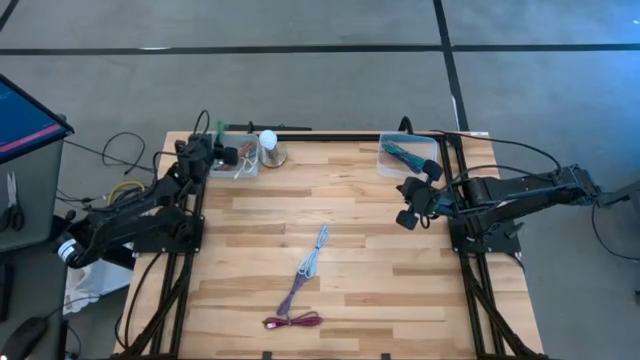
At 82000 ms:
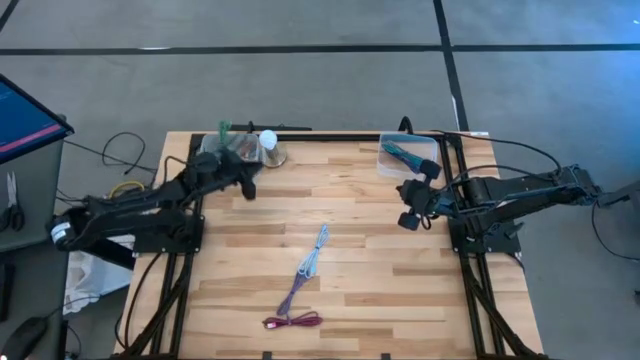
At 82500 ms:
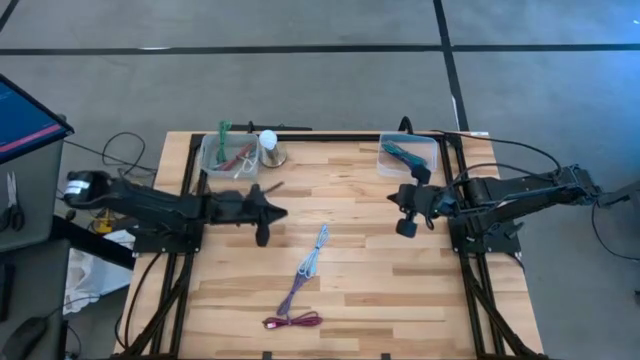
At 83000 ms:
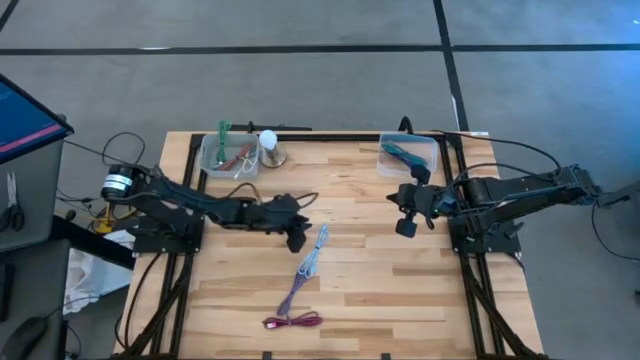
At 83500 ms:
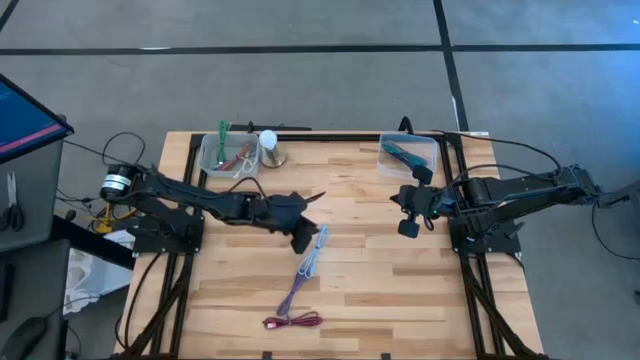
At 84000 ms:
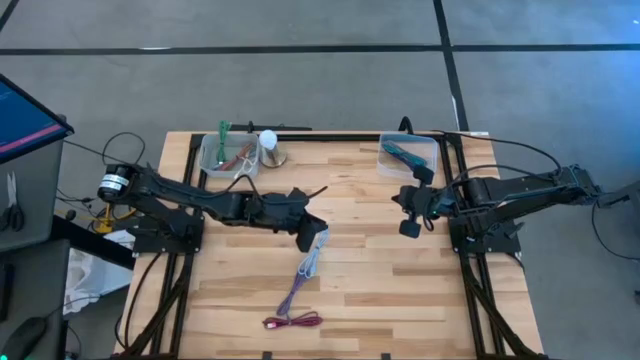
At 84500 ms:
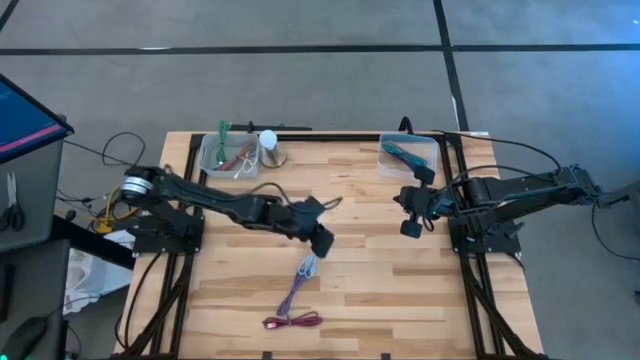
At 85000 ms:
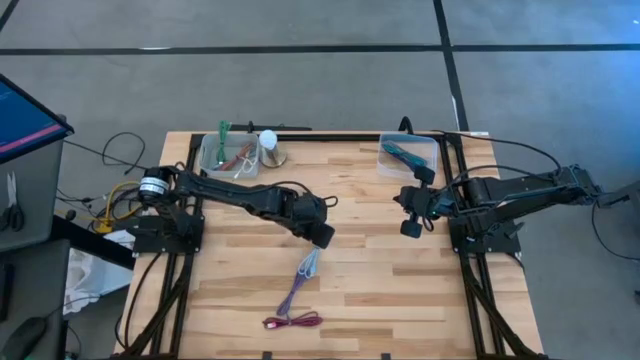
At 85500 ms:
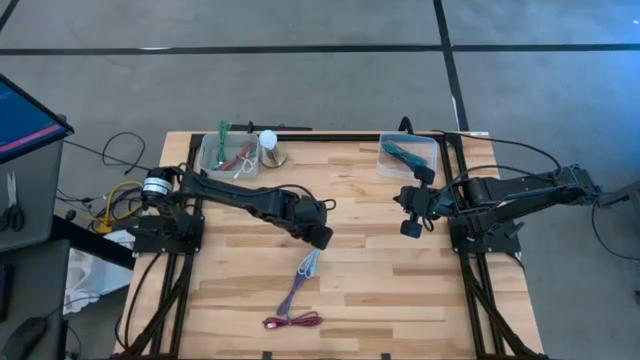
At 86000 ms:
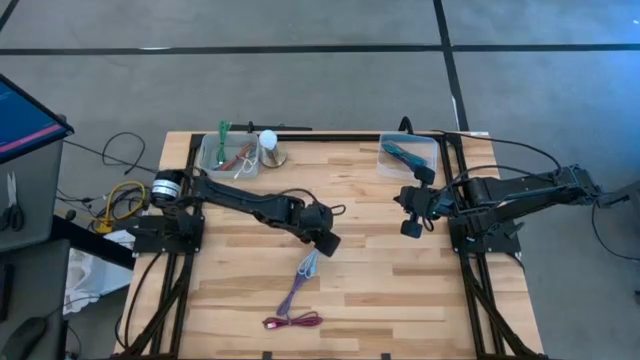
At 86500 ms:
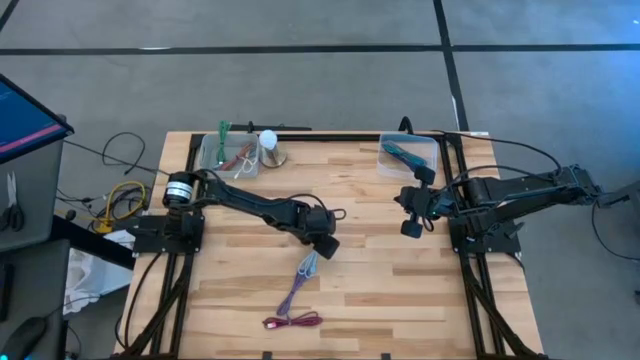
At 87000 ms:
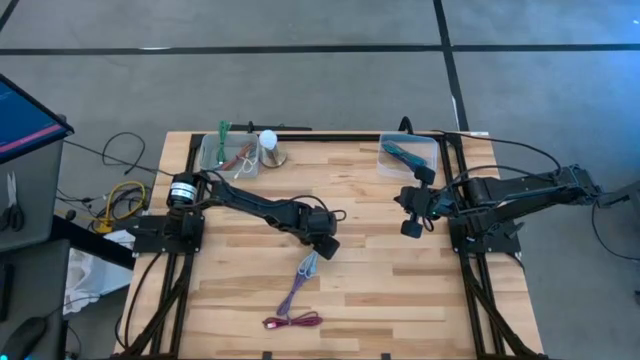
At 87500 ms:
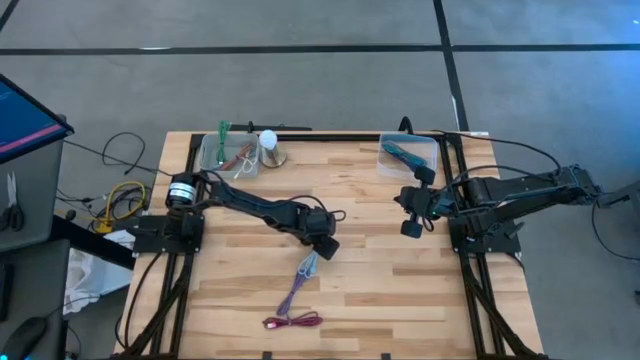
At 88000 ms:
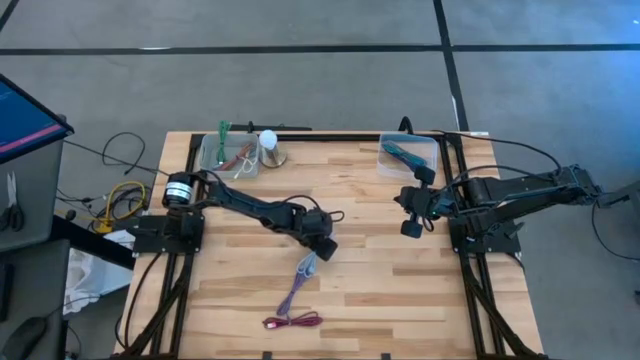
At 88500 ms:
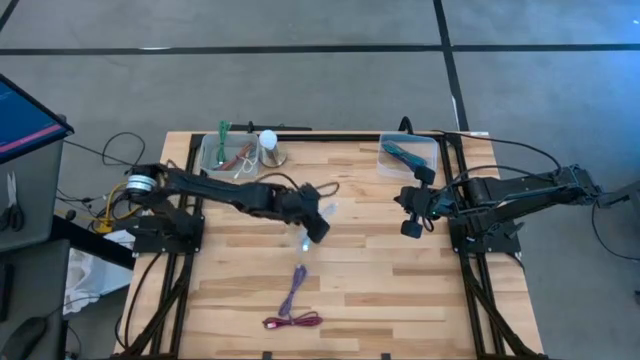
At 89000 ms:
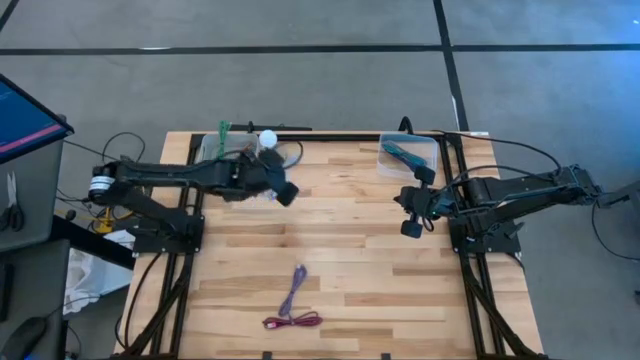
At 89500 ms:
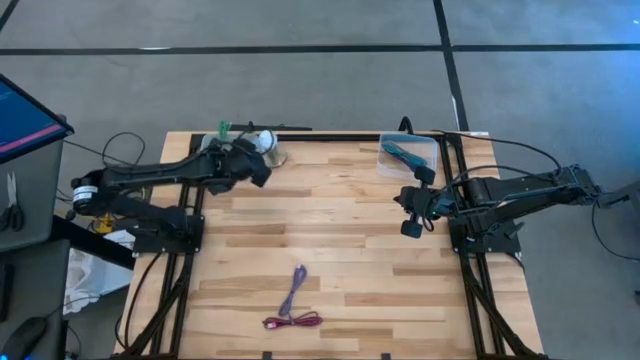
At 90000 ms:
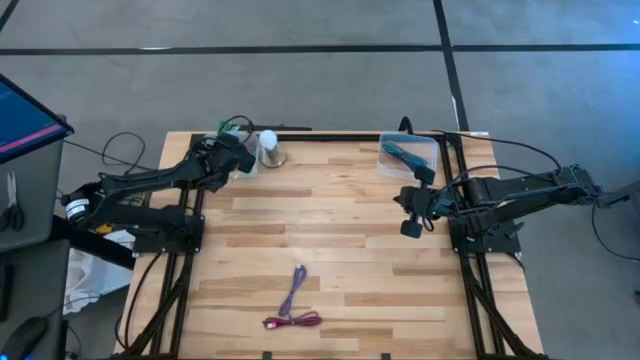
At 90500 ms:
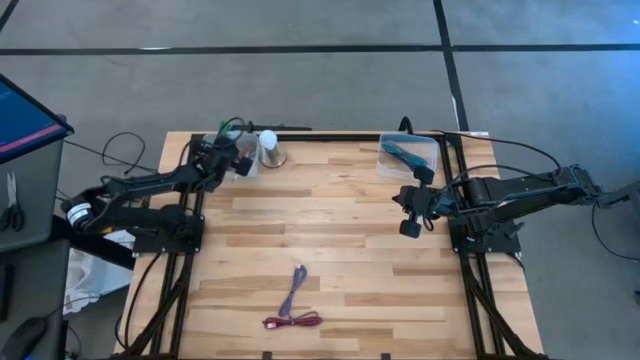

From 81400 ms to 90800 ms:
Task: Pick & Place USB Port
Put the light blue charger cable into the gray bin

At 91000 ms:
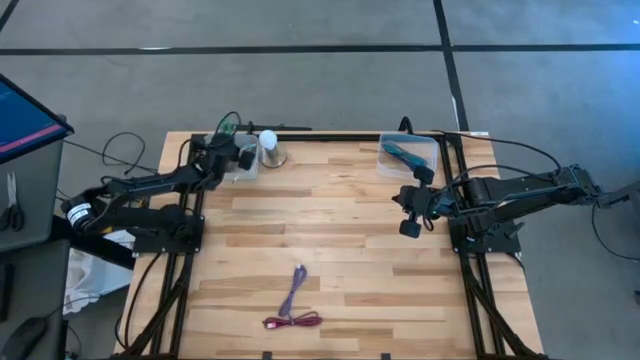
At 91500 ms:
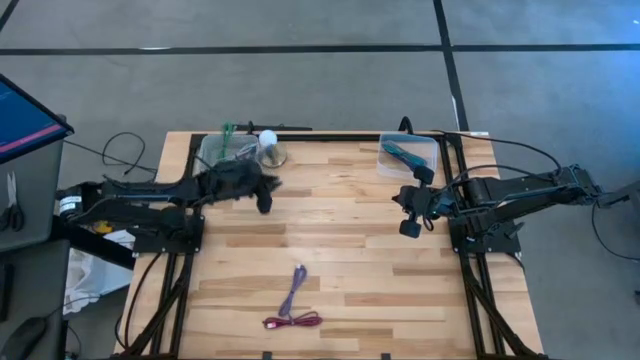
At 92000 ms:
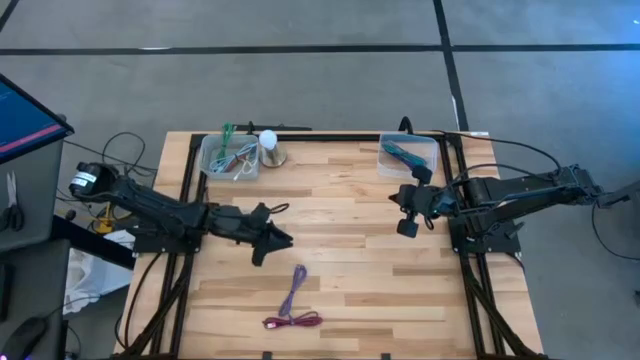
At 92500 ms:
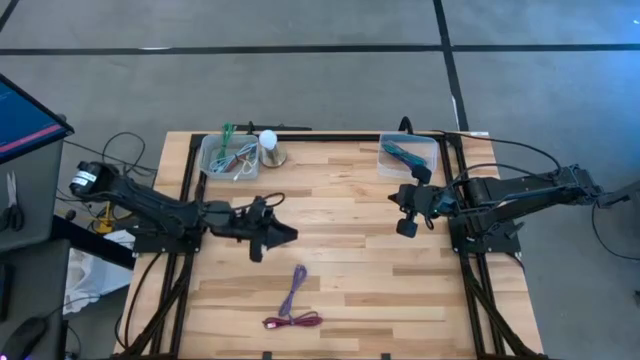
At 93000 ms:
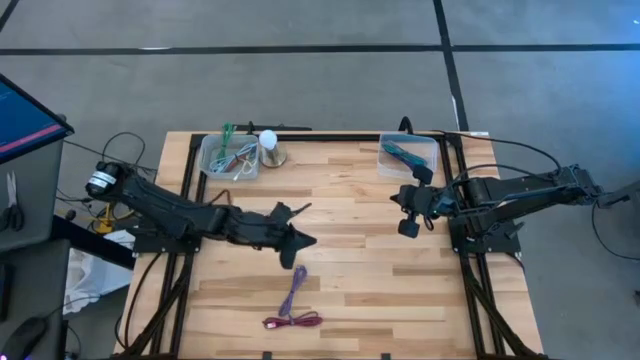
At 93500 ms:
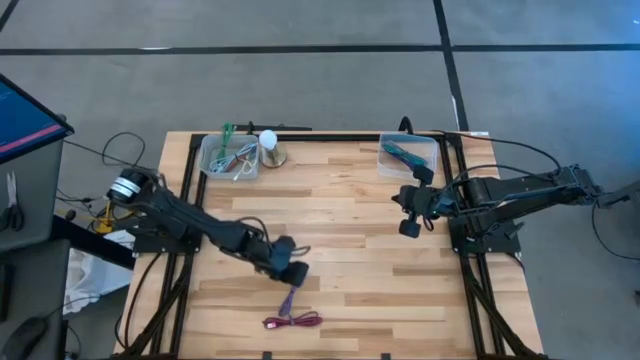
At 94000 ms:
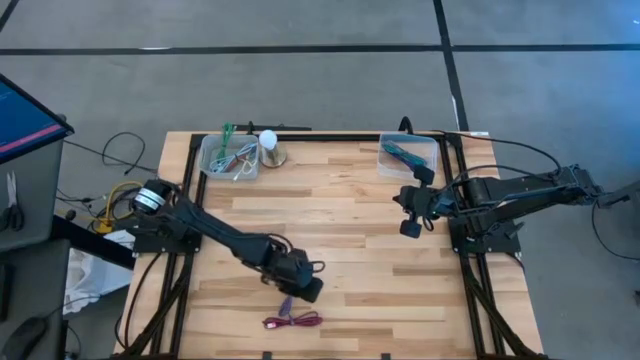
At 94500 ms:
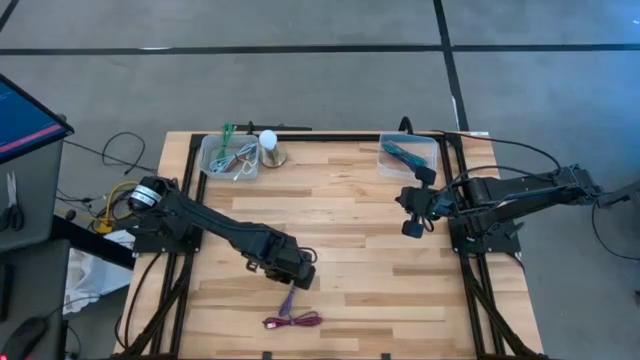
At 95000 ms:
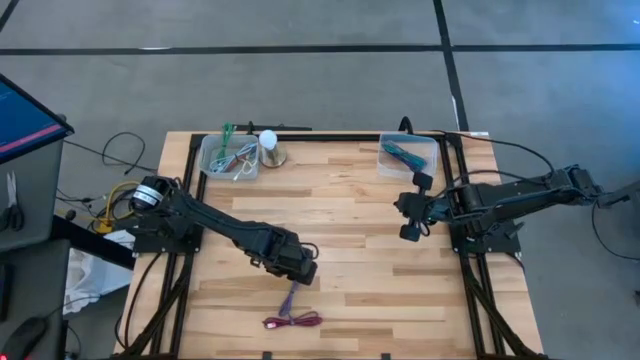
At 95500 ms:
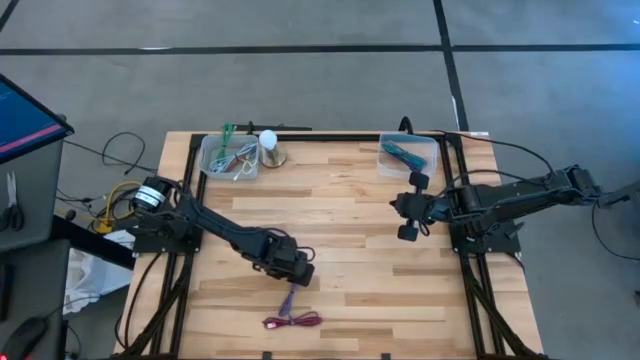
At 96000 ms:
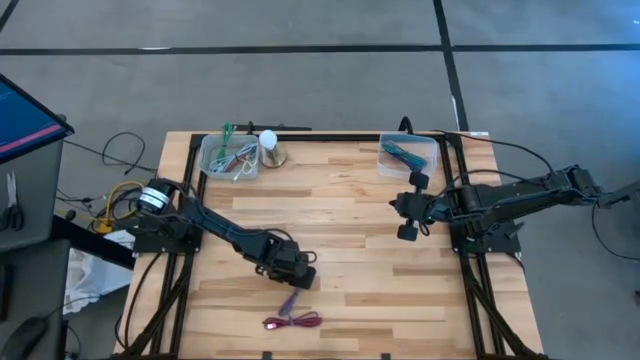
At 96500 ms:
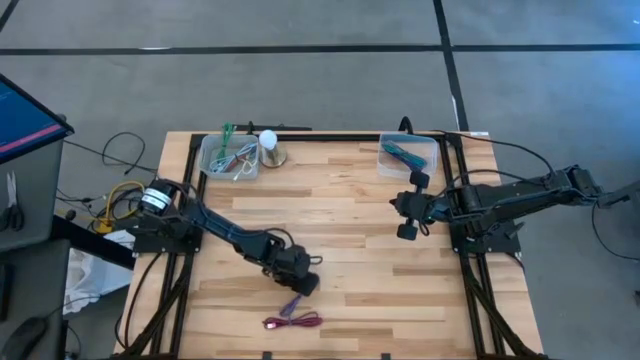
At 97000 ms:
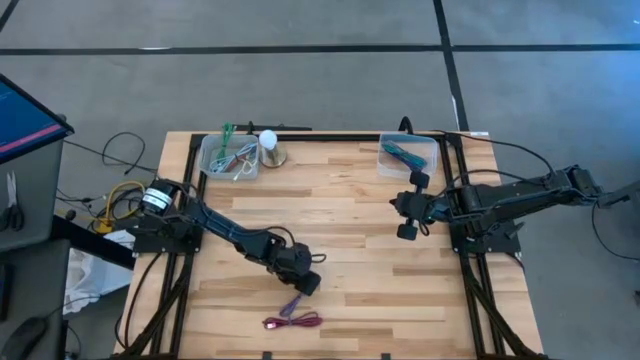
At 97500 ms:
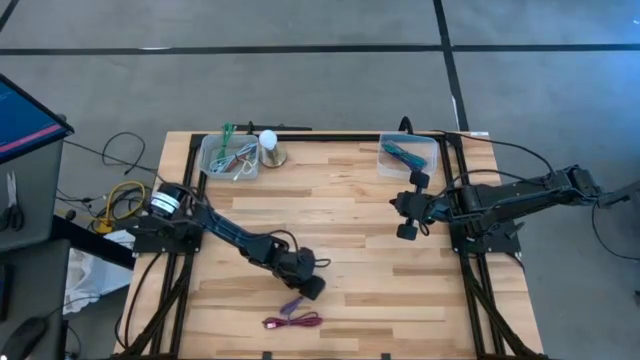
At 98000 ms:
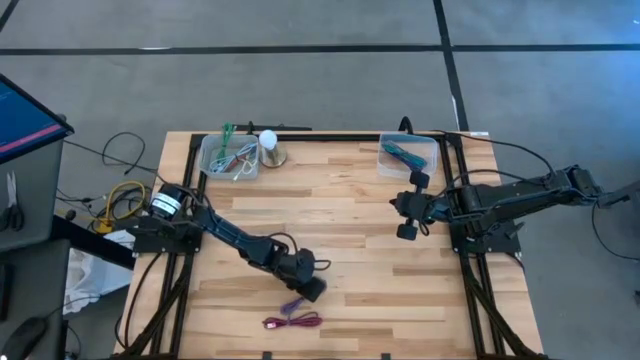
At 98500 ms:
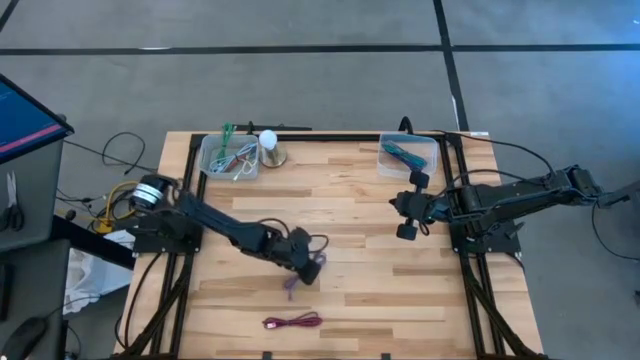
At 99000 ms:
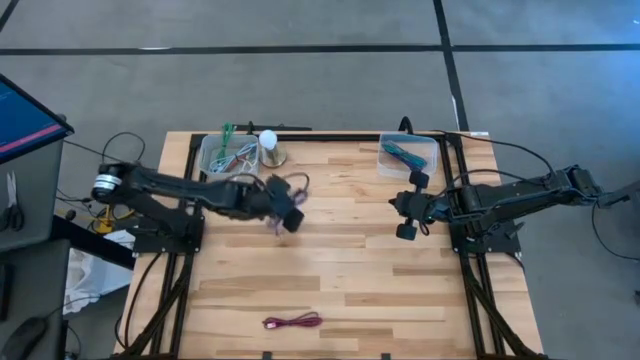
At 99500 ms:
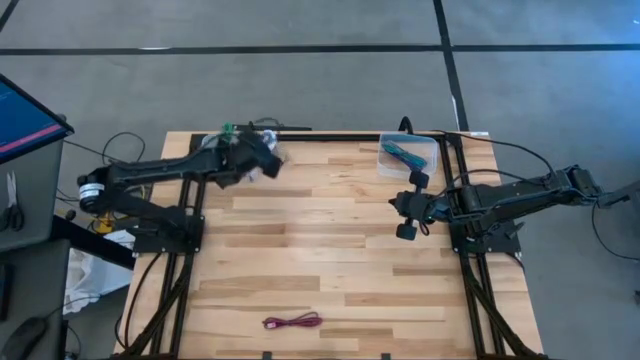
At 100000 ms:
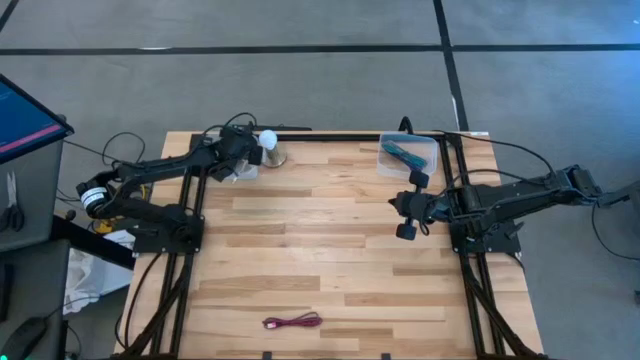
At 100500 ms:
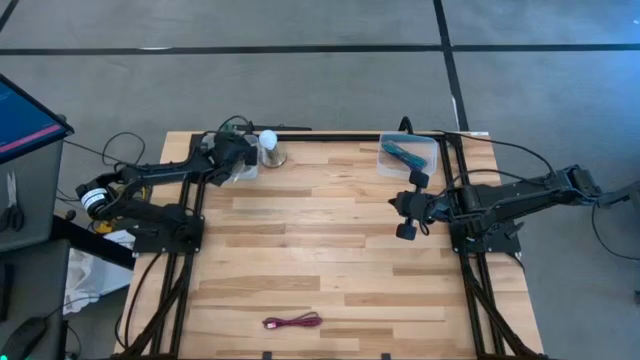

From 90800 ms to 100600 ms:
Put the purple charger cable into the gray bin

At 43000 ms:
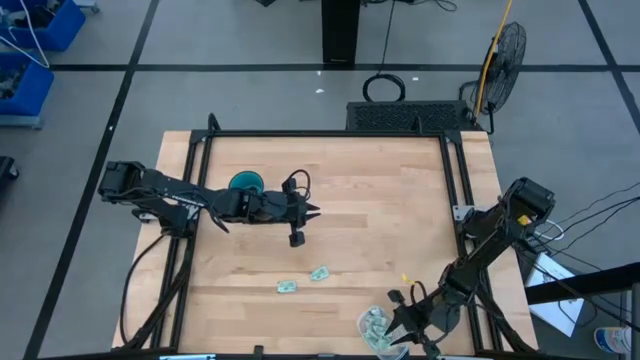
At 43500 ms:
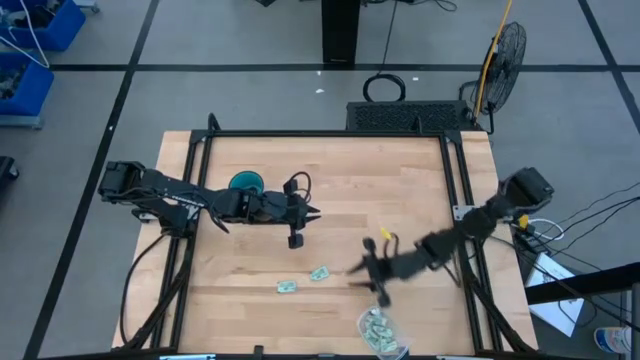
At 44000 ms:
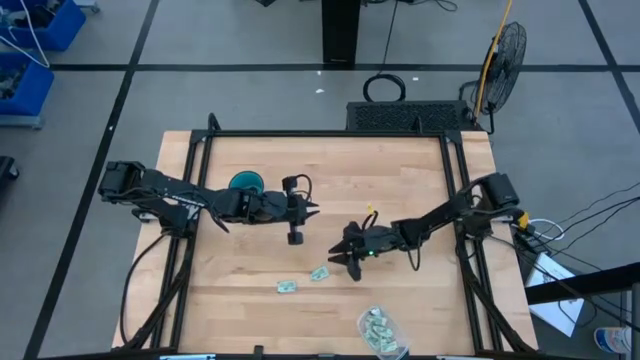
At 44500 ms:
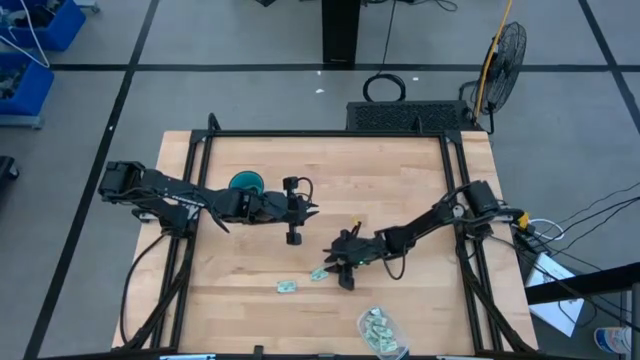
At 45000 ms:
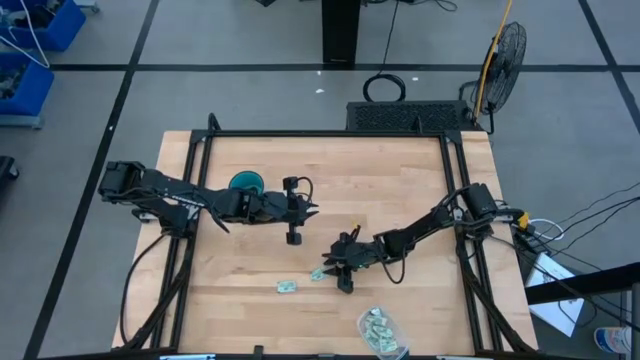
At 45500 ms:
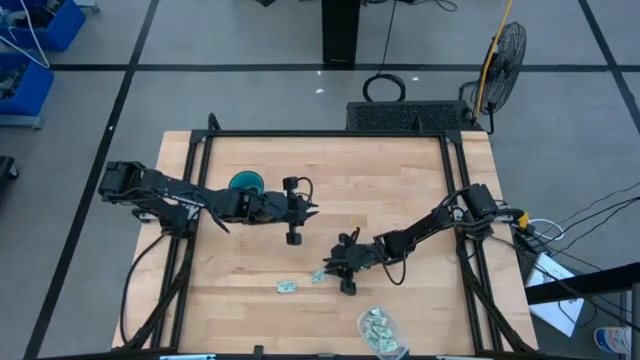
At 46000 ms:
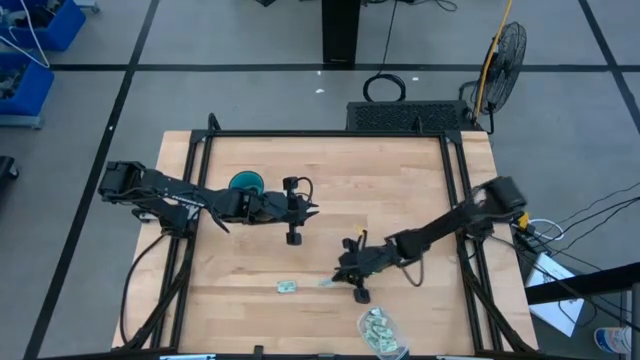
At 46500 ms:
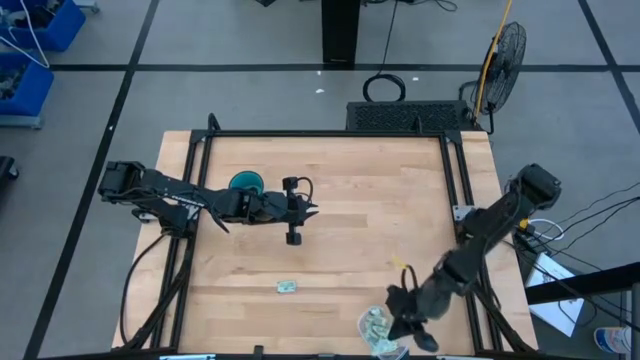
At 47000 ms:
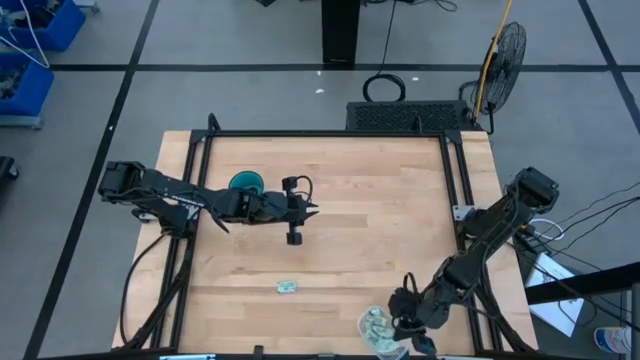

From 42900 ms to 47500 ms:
Task: Pick and place Stevia / Truvia into bins
Put the green stevia packet into the transparent container
